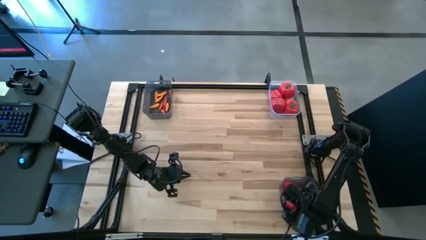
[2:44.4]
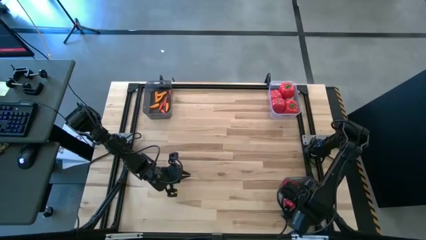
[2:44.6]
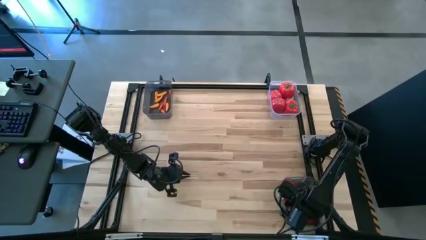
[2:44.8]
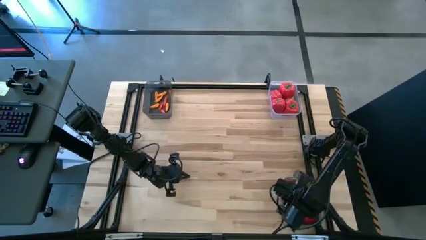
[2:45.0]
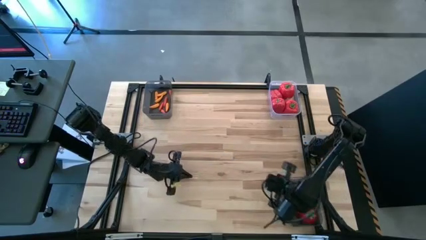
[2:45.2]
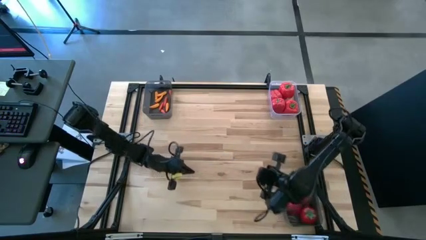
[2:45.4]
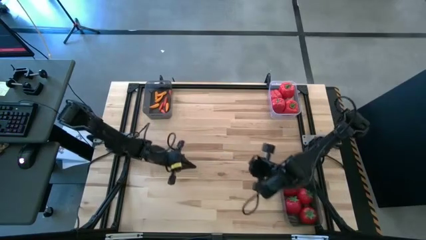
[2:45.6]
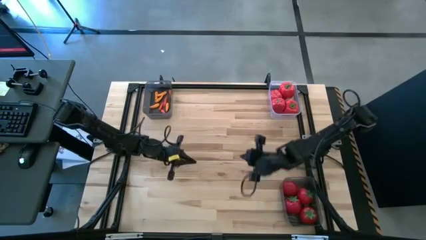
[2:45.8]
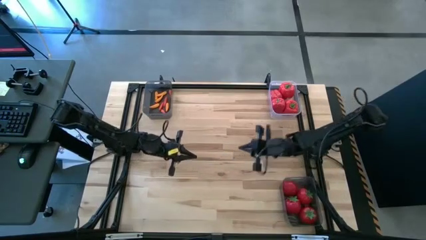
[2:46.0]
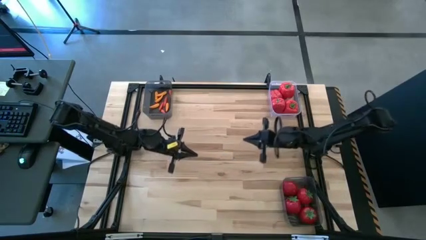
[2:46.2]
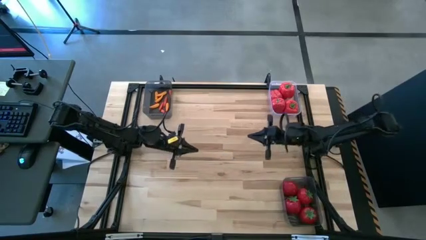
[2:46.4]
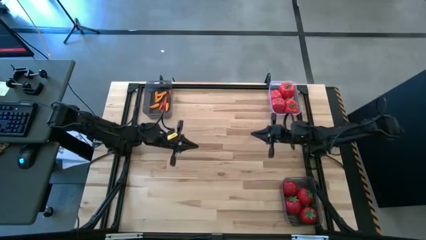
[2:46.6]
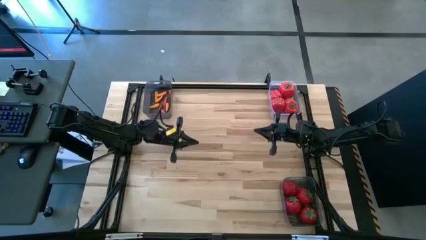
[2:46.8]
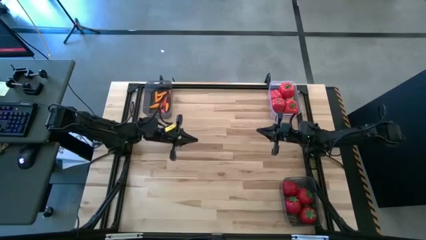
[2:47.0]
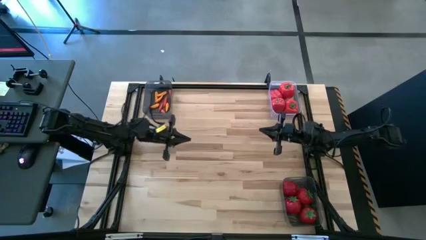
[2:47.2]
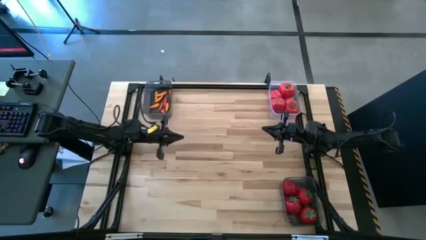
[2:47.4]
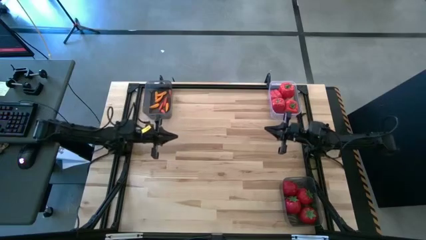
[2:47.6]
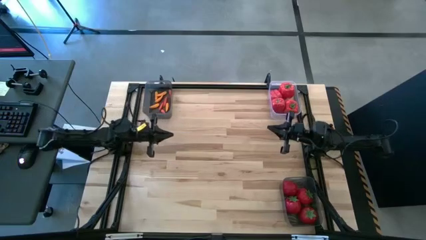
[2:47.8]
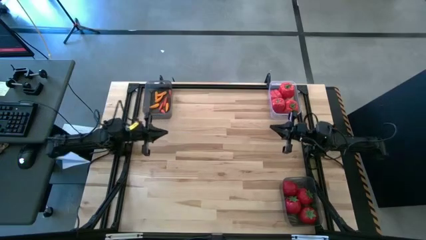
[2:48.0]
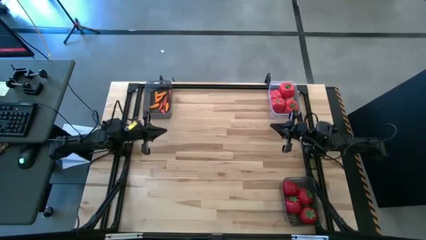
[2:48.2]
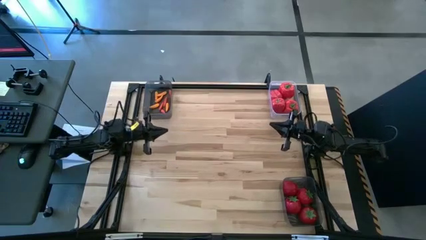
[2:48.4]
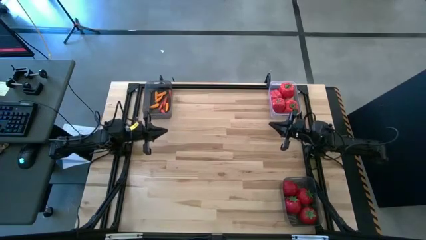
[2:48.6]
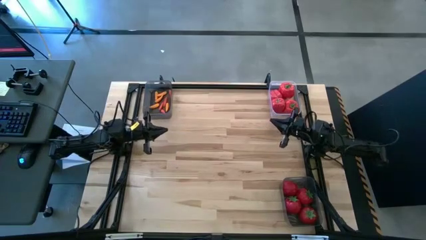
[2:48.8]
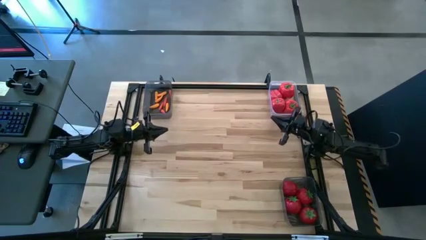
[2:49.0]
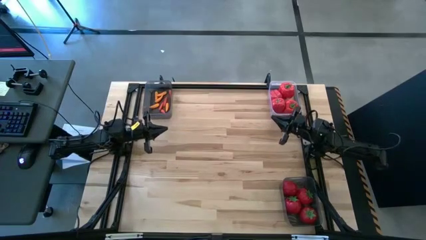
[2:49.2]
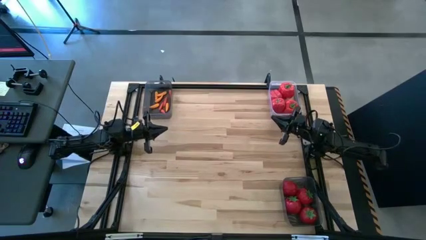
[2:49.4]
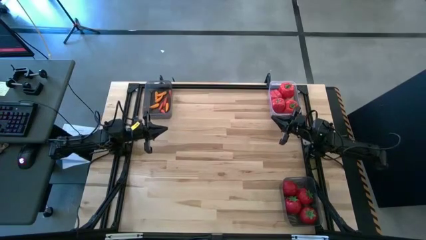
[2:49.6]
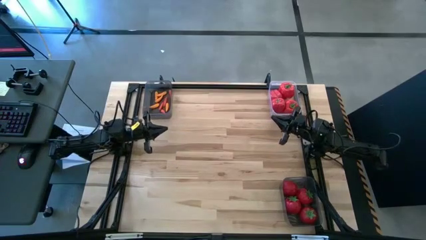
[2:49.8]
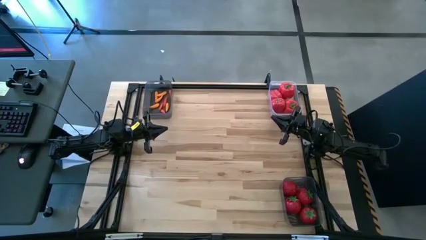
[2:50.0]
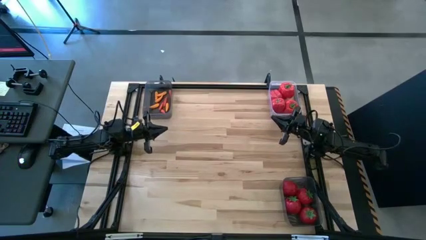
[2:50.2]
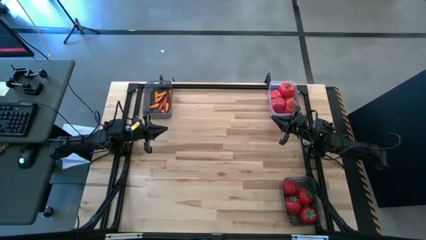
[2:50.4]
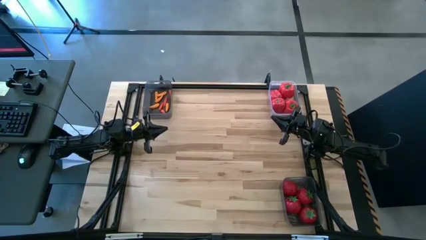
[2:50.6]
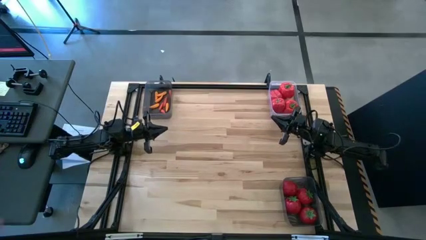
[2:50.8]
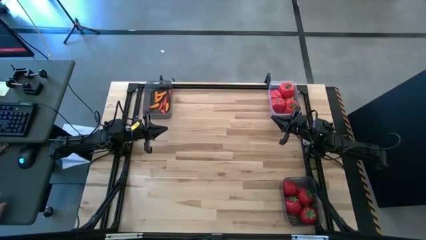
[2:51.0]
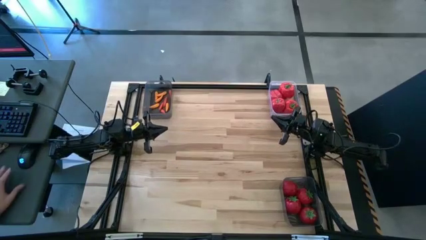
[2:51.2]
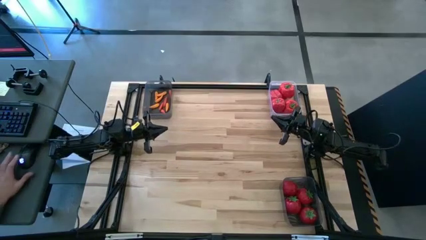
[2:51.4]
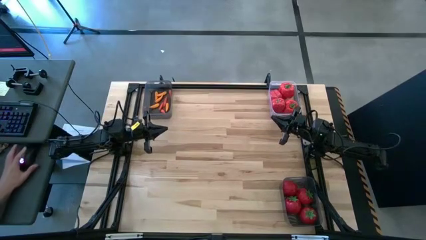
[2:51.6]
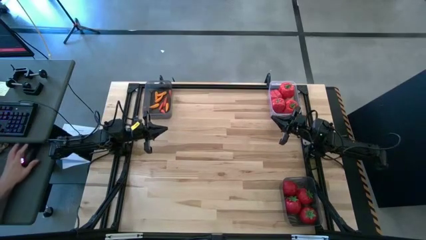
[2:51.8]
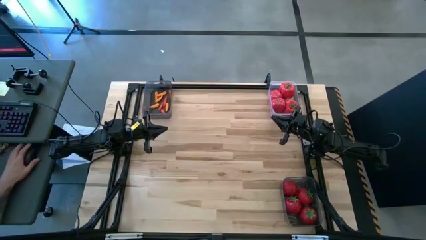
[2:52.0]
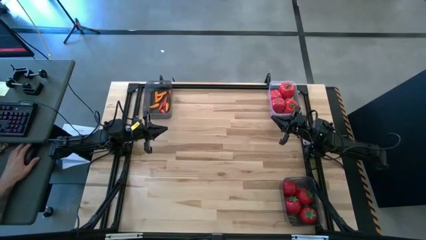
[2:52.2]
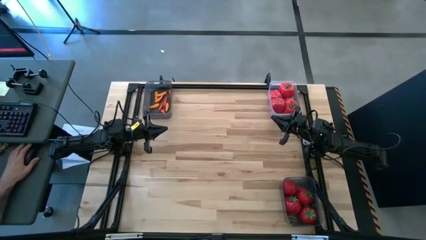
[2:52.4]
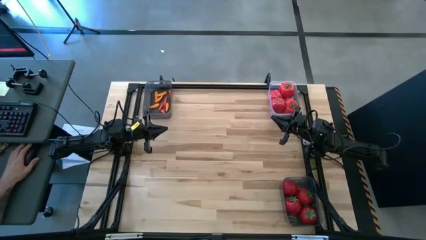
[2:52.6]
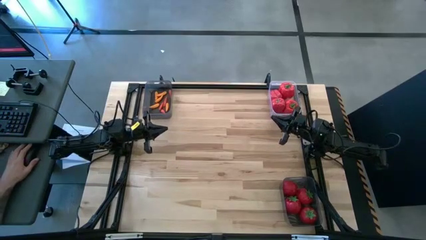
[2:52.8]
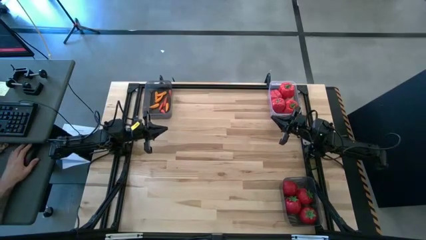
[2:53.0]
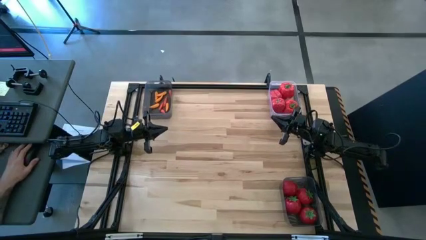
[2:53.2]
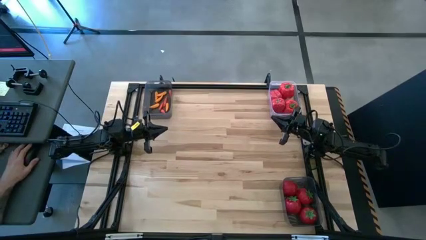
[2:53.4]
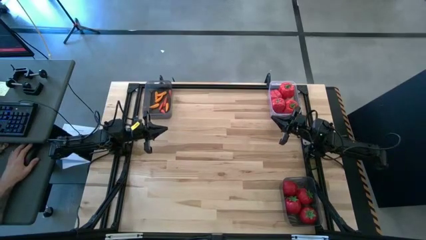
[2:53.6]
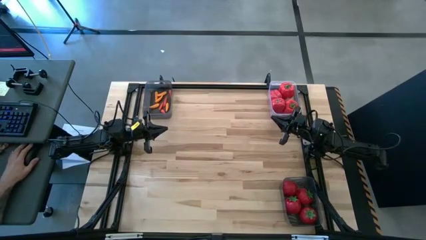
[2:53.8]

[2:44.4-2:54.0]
Task: Sort produce into baskets
Return to Home Position

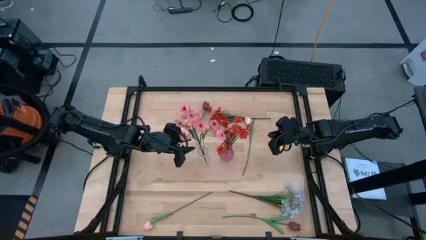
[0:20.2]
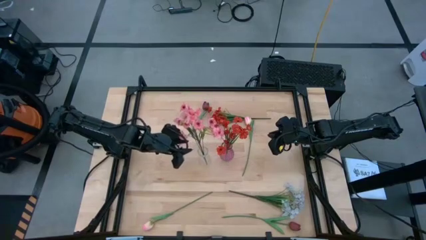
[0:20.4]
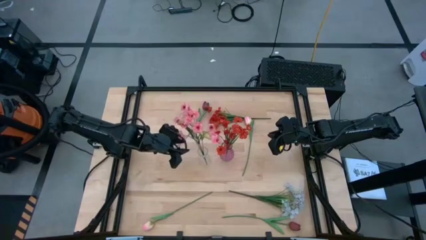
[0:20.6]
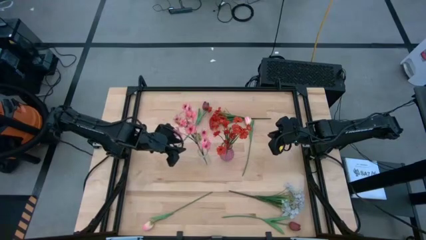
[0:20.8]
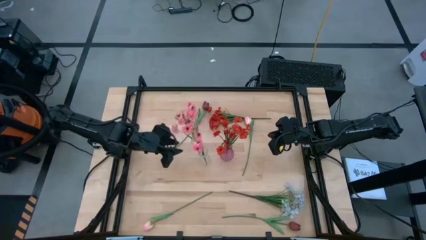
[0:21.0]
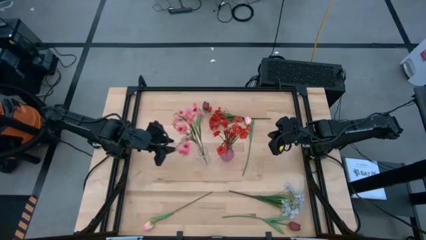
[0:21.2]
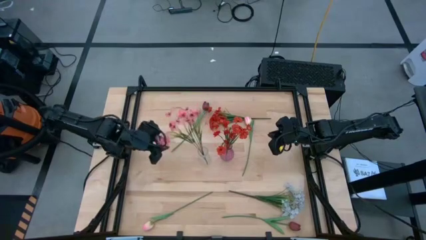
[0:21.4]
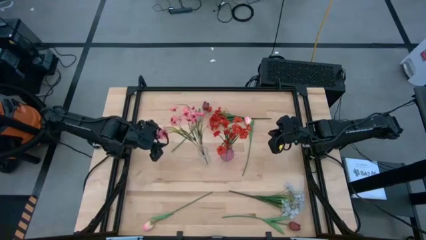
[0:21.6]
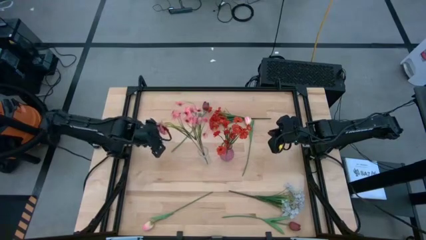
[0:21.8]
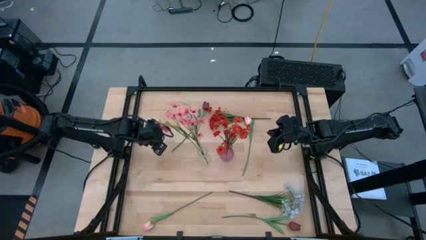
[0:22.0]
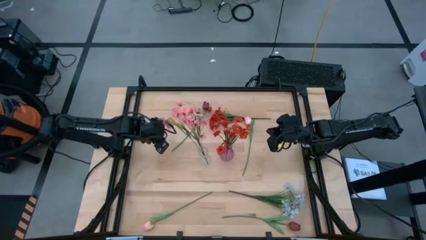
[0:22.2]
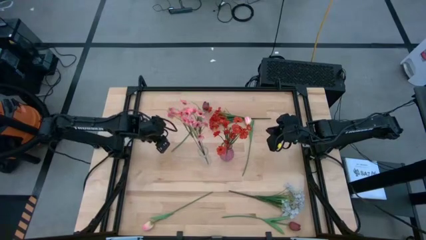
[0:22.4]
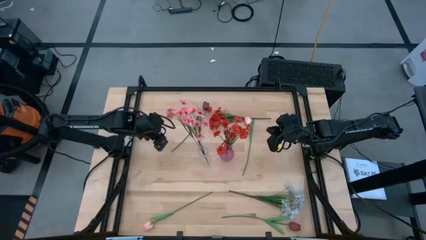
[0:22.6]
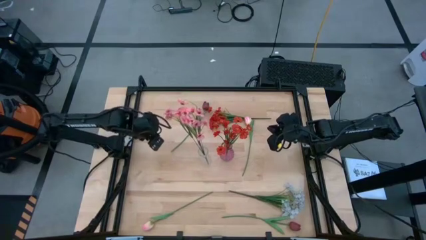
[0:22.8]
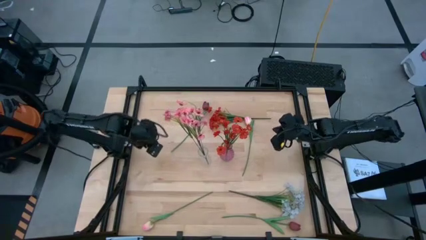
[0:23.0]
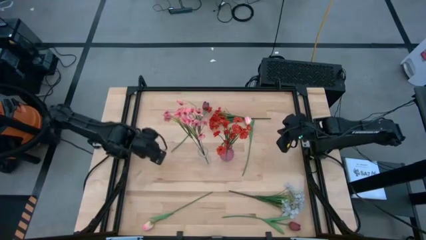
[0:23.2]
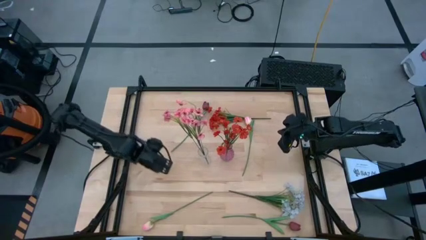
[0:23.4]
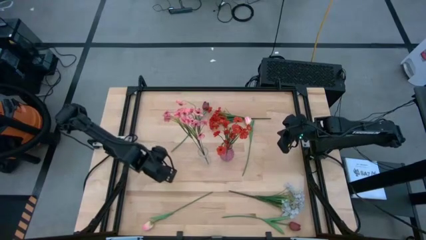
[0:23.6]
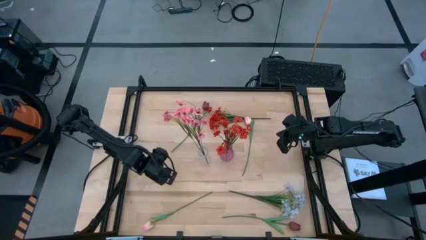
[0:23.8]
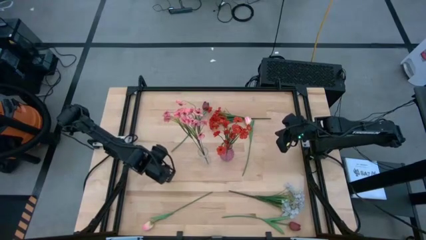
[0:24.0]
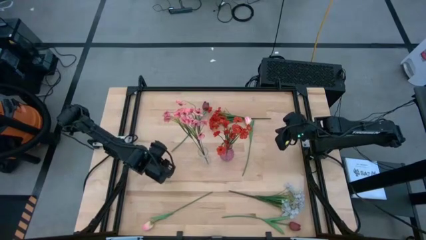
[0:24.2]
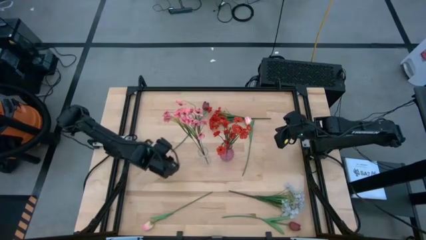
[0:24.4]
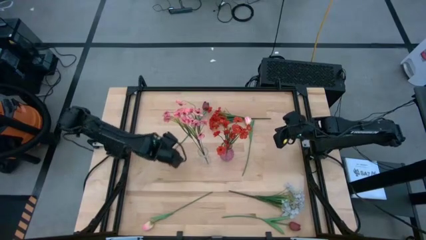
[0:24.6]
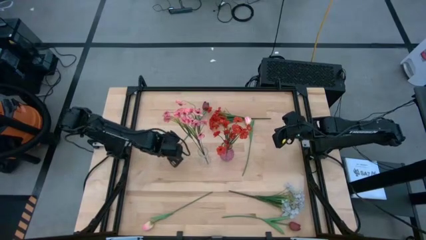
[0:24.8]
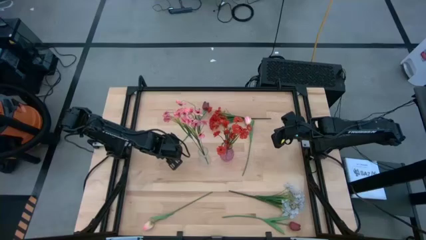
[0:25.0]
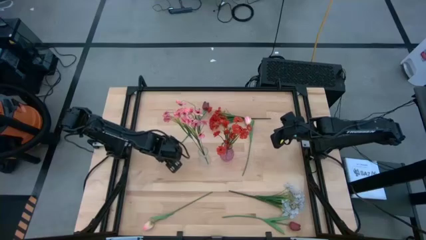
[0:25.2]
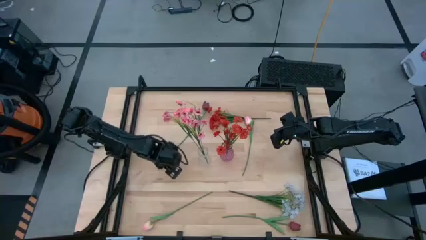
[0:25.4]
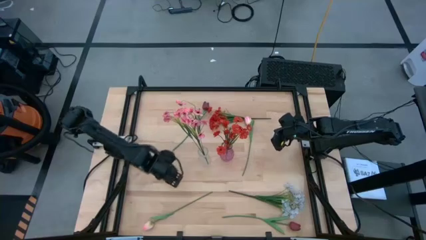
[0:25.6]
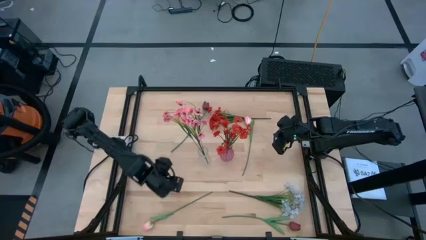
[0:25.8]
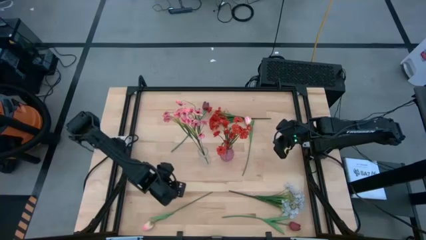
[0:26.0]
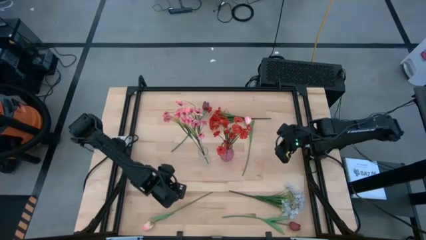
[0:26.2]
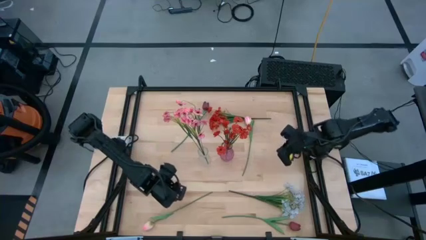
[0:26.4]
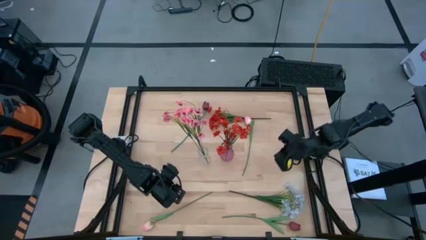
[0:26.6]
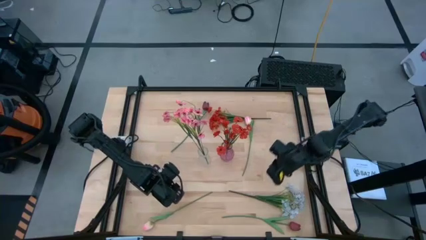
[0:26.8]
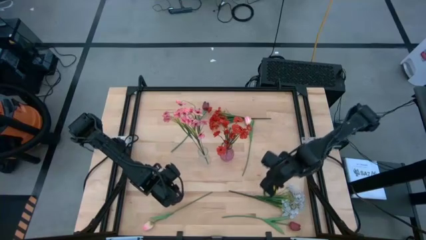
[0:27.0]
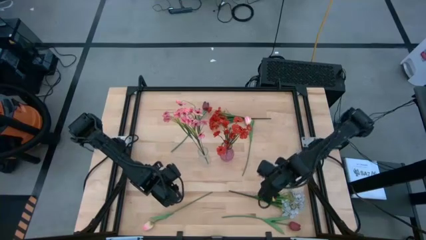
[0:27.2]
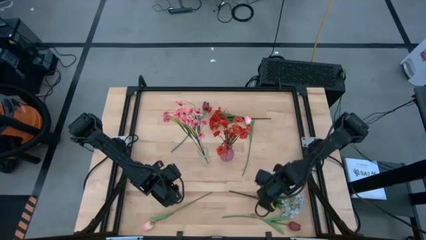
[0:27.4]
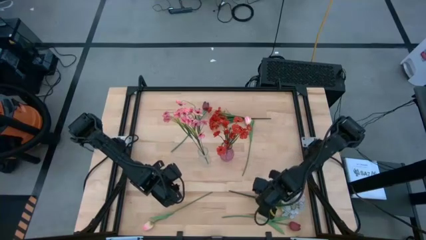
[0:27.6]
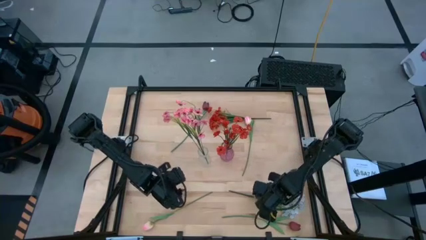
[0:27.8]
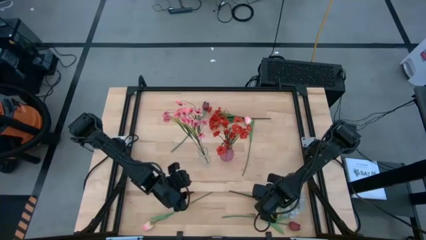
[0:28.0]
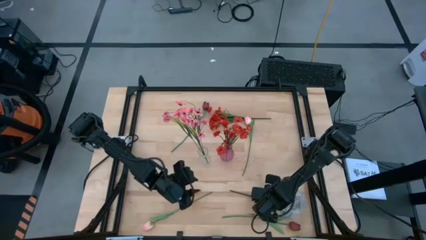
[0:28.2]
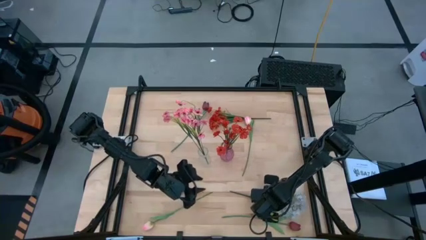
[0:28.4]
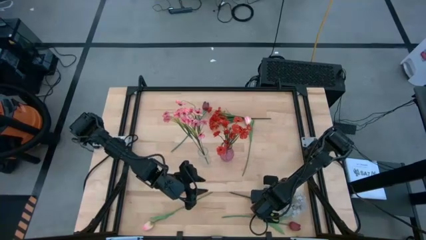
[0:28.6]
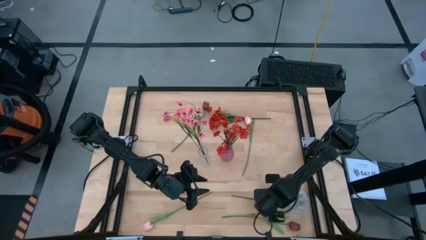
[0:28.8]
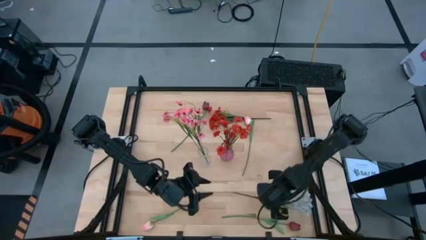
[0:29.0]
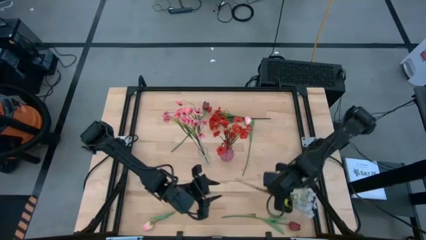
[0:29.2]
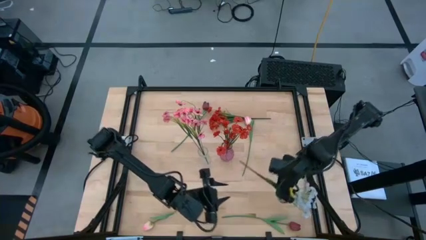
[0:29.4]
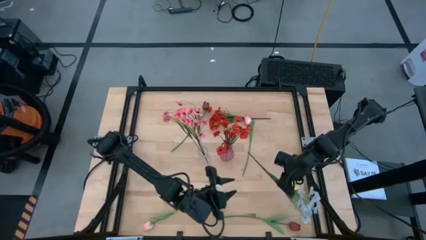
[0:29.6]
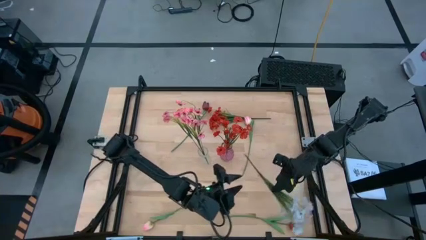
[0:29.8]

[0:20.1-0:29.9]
Task: Sort flowers into vase by color
Put the white flowers into the transparent vase
